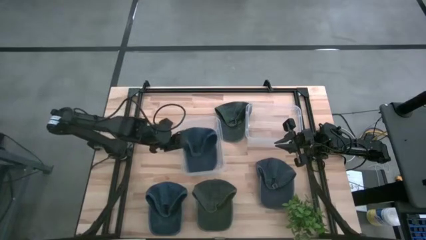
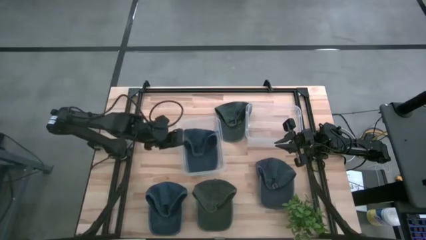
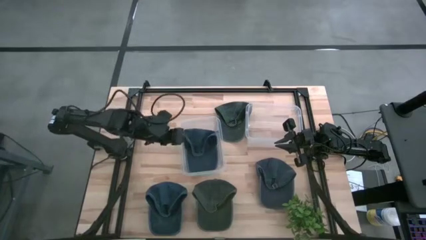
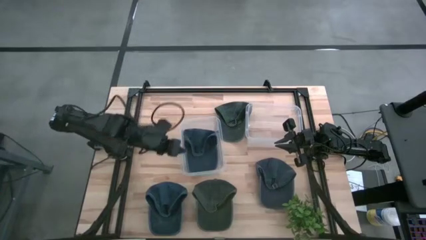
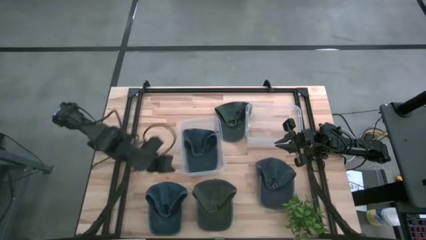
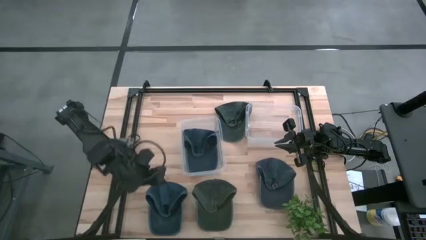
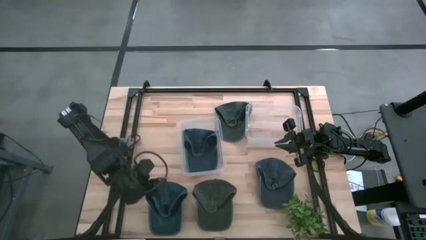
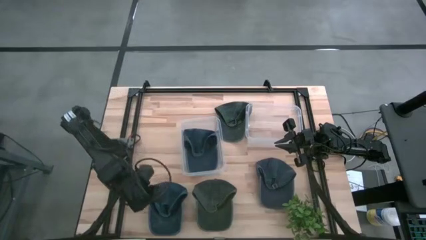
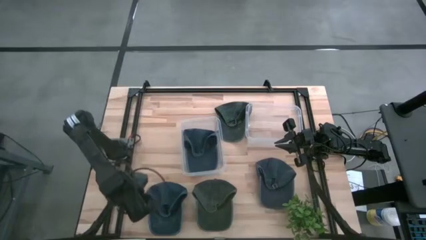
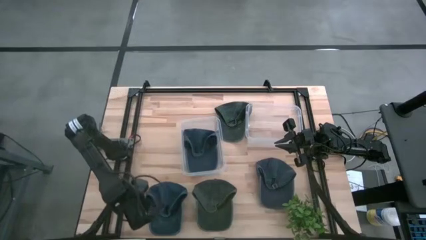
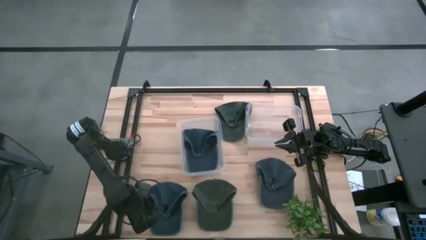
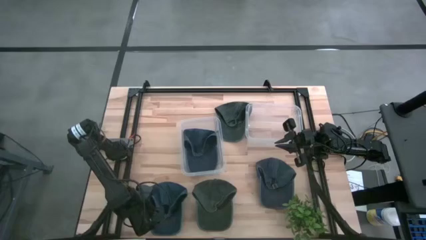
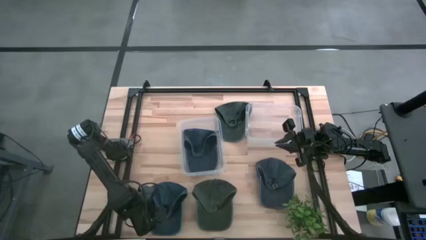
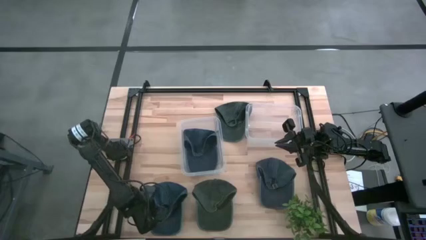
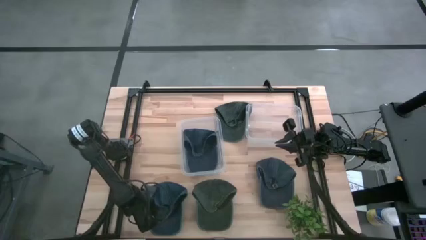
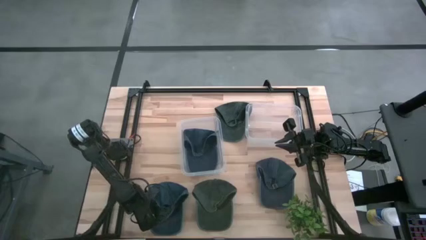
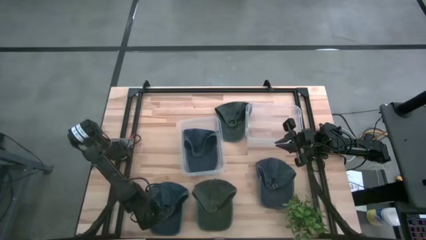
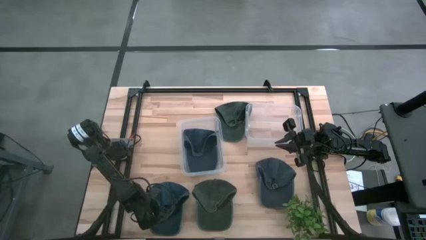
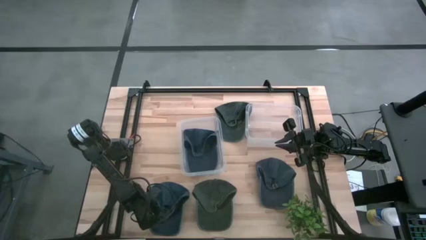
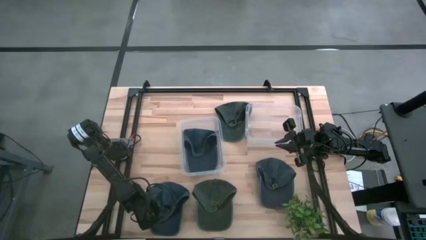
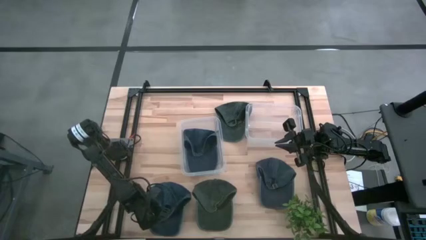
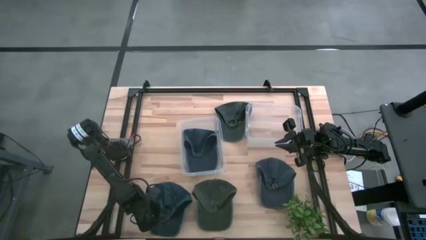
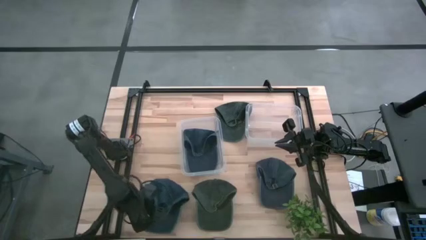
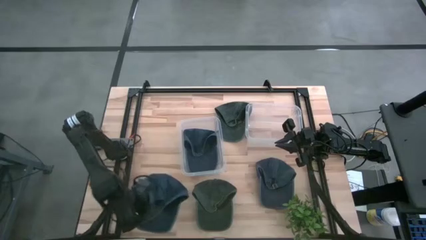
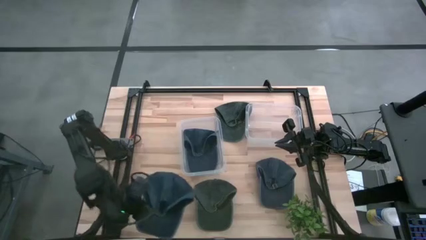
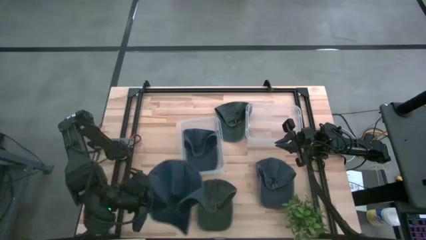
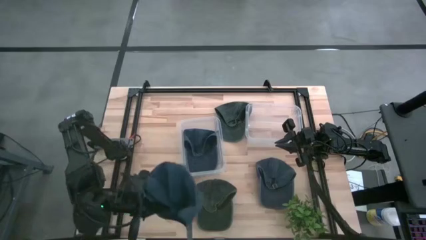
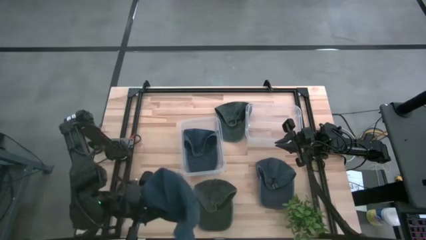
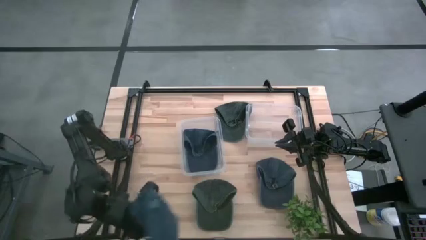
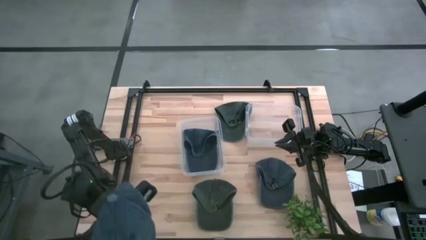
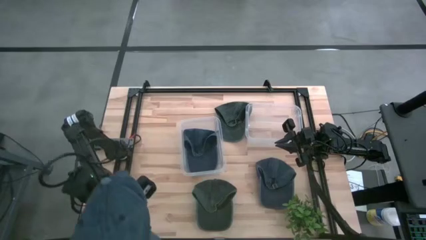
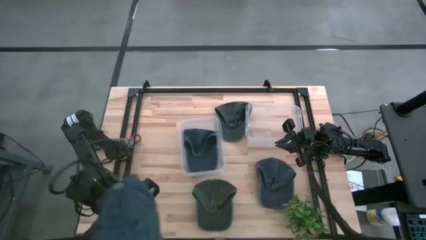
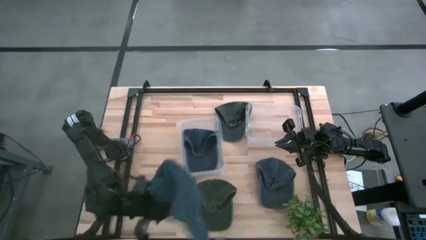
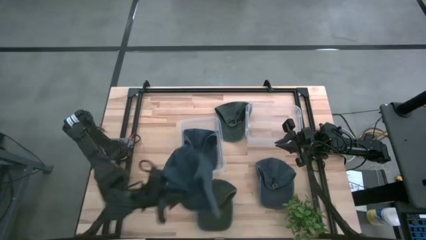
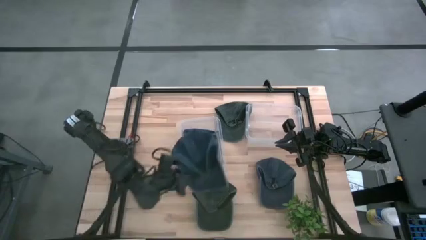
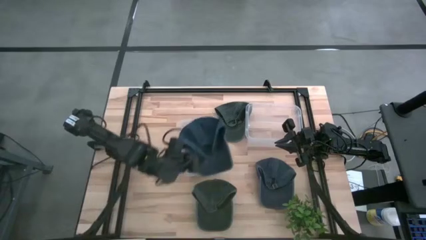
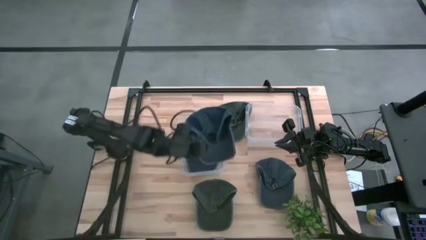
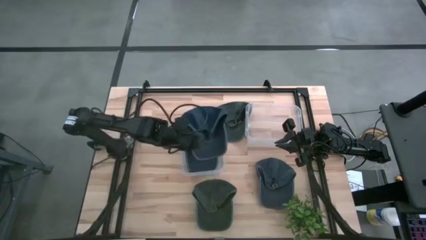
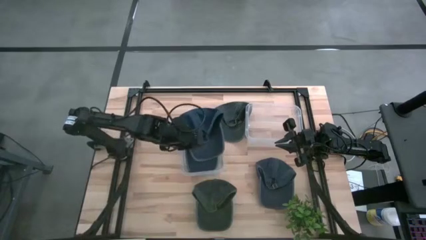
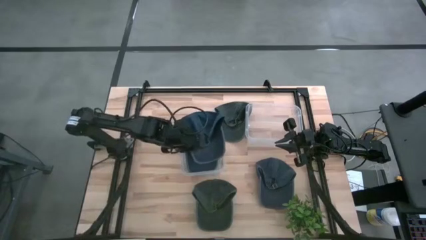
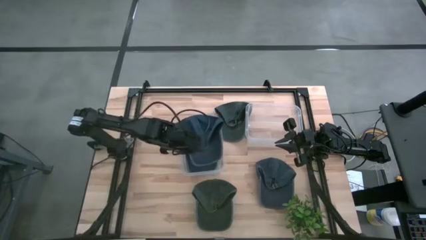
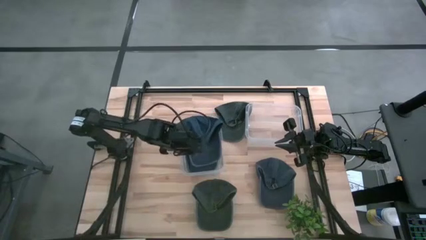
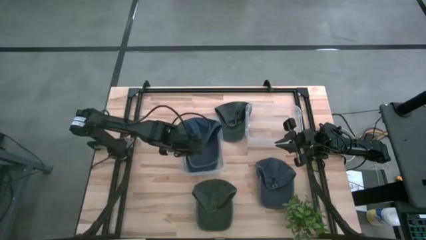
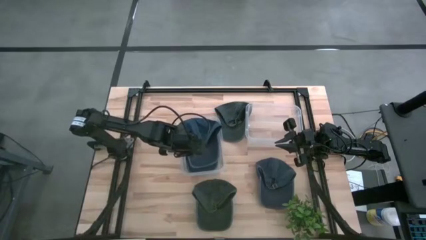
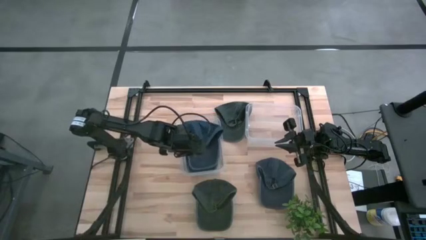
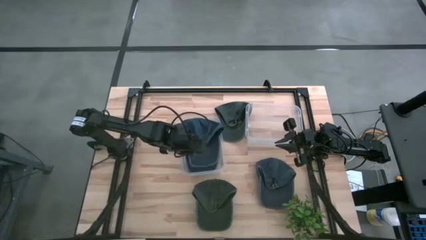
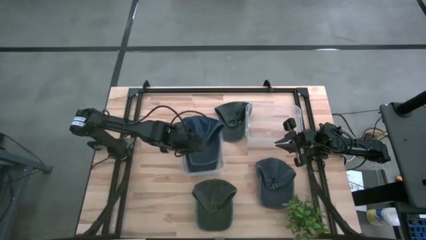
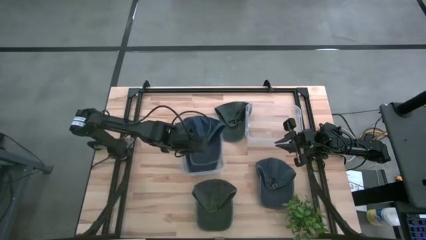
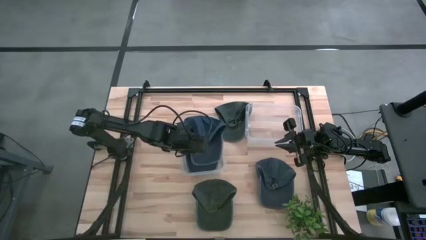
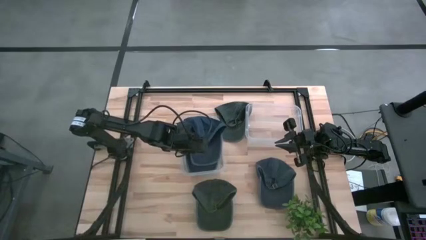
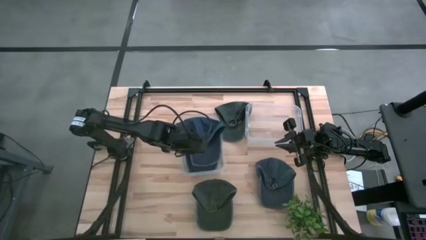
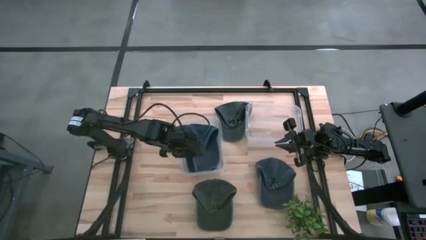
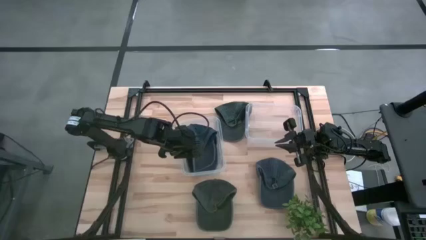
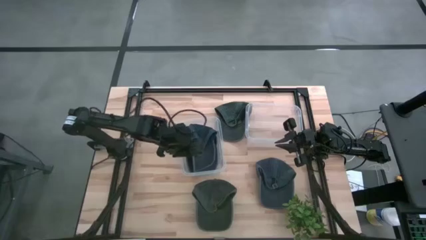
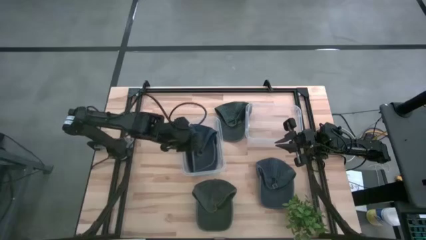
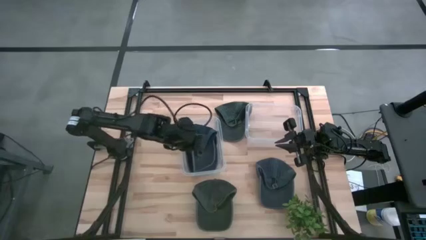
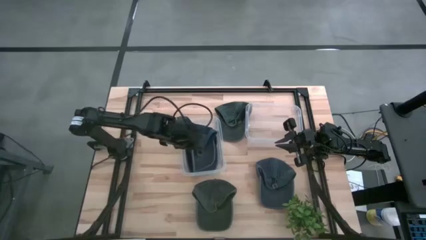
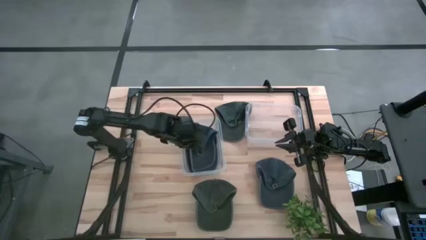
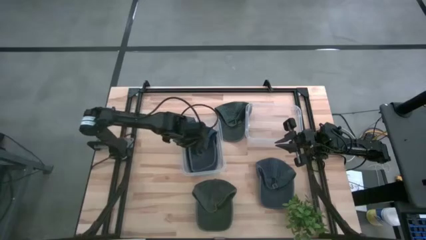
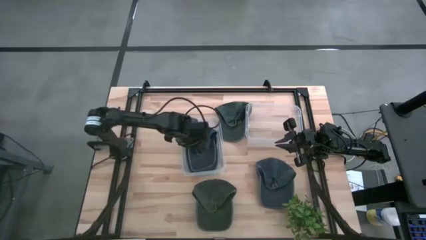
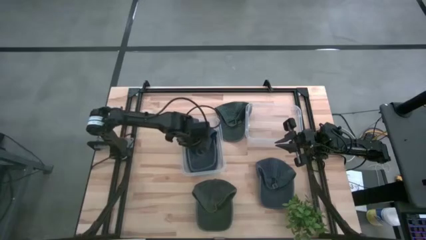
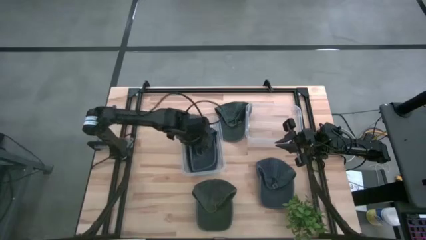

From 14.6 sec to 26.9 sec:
Task: Pick and place caps into container
Put the left blue cap into the left transparent container

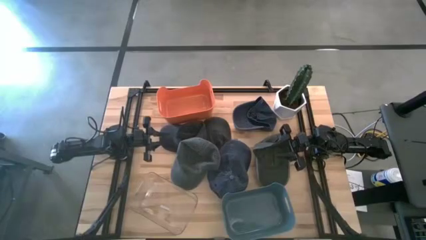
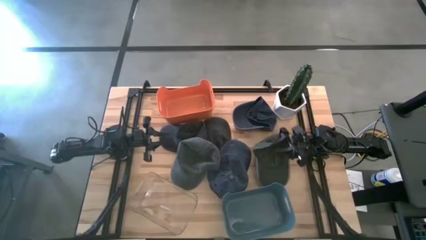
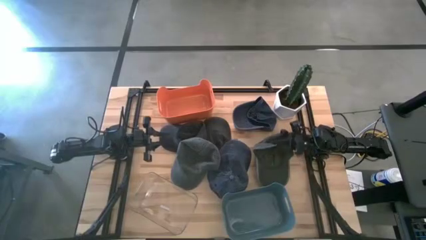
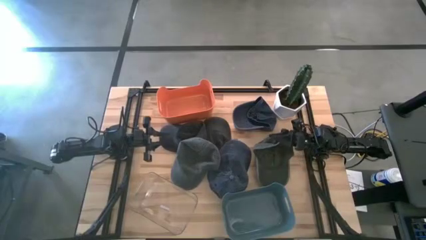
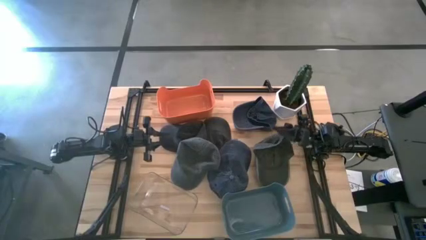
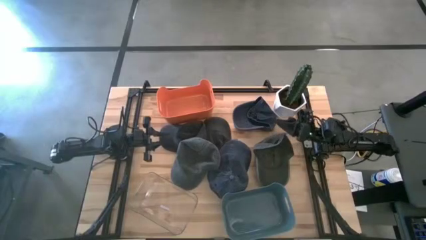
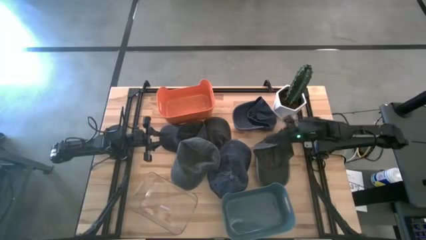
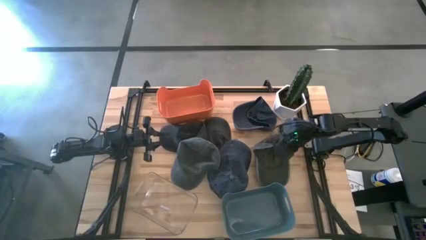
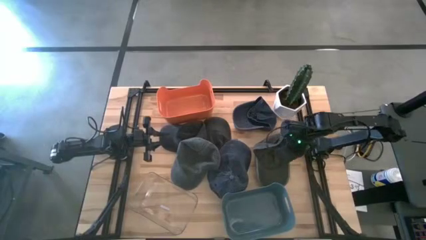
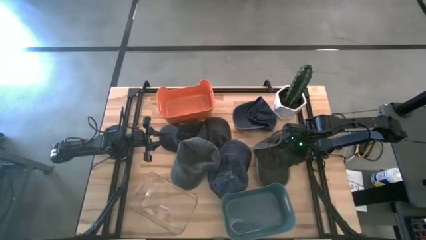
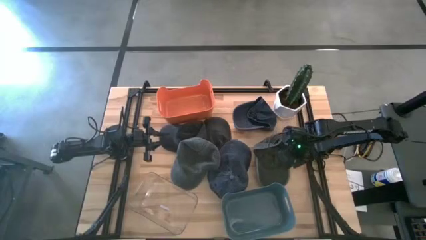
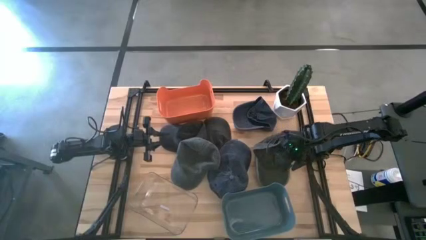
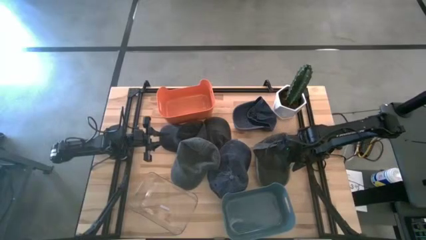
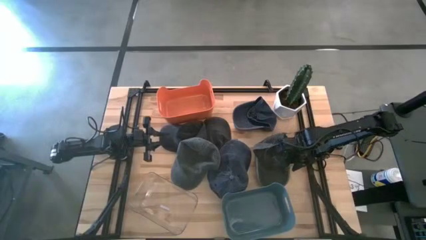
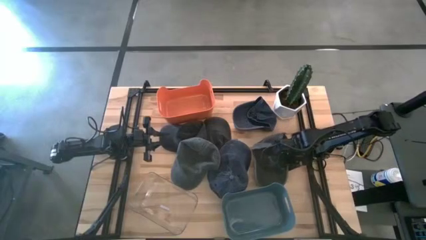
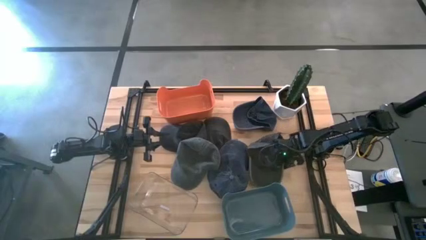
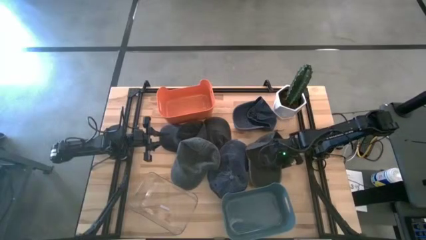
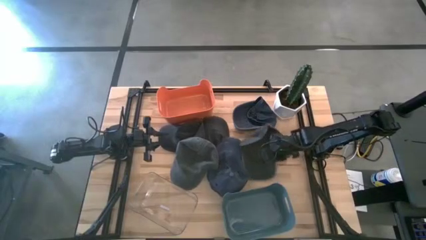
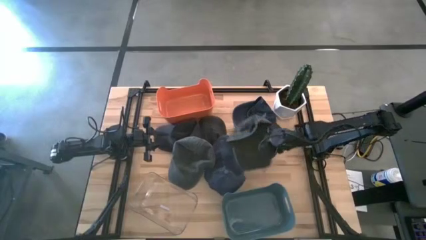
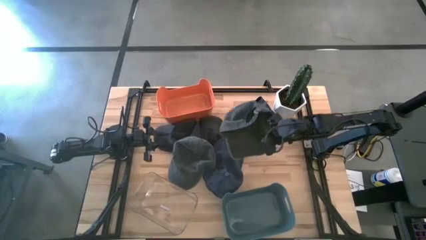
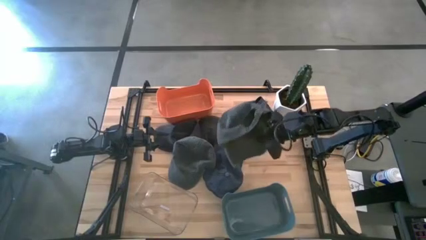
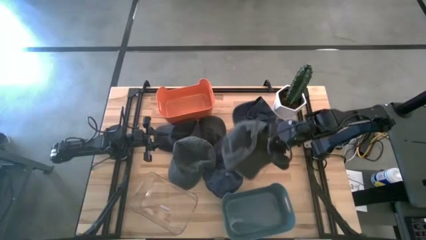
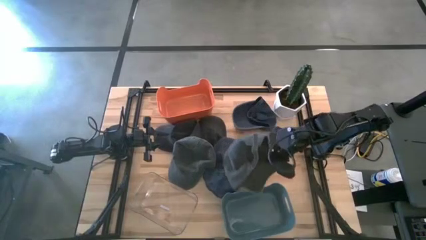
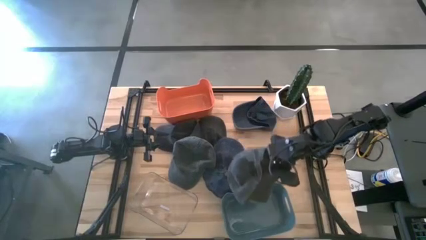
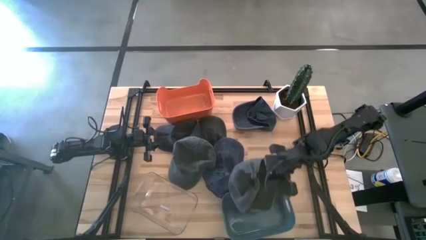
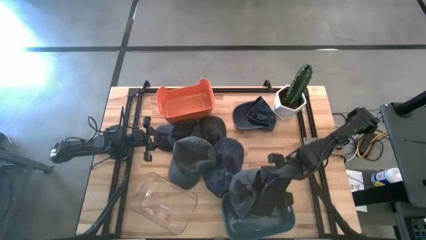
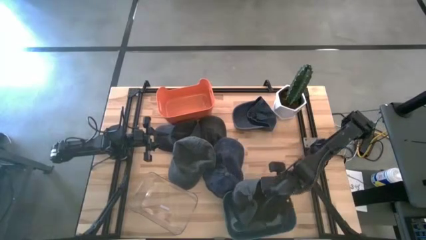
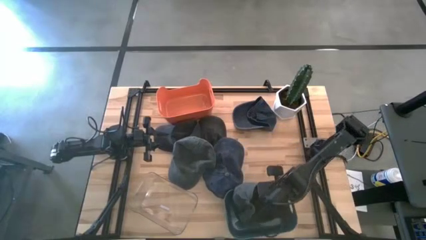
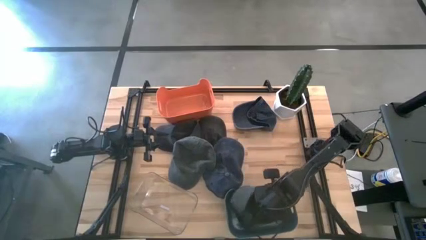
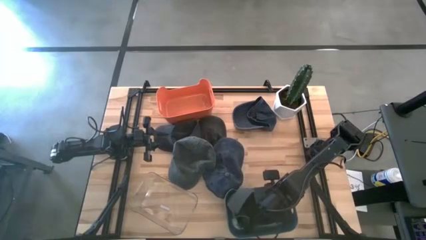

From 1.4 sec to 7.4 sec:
Task: Pick & Place hat
Put the right green cap into the blue bin
